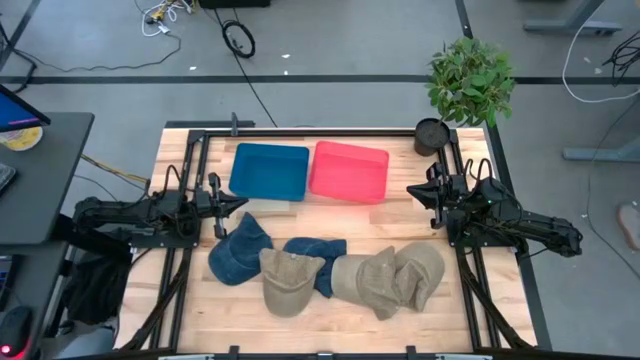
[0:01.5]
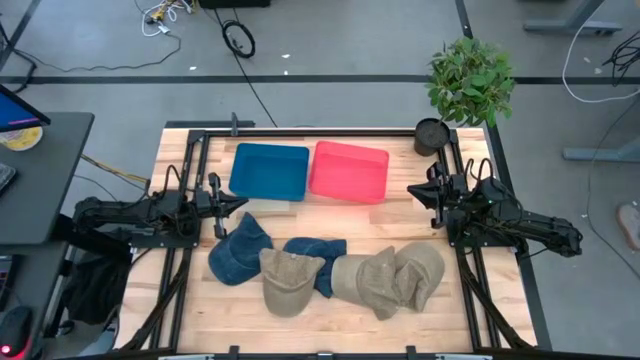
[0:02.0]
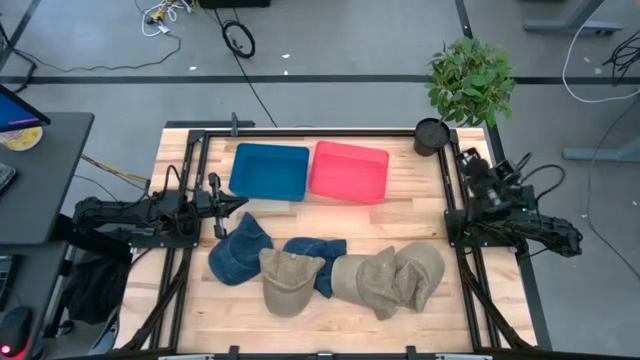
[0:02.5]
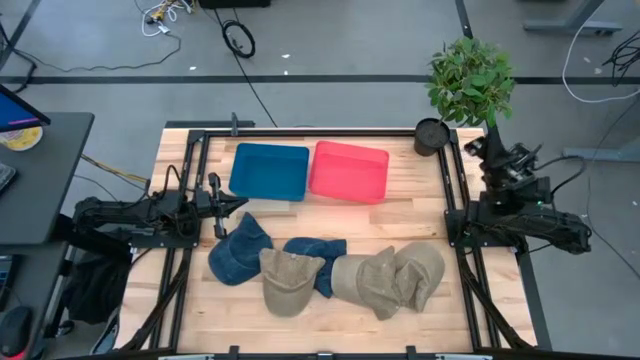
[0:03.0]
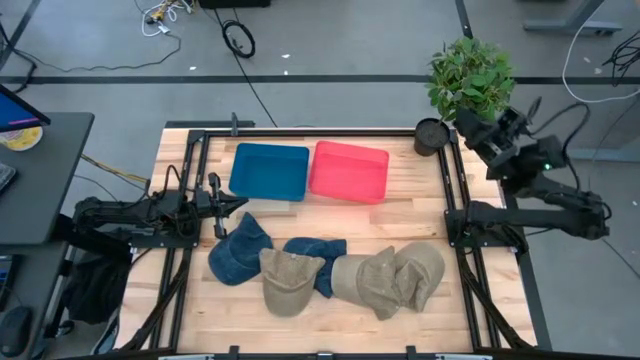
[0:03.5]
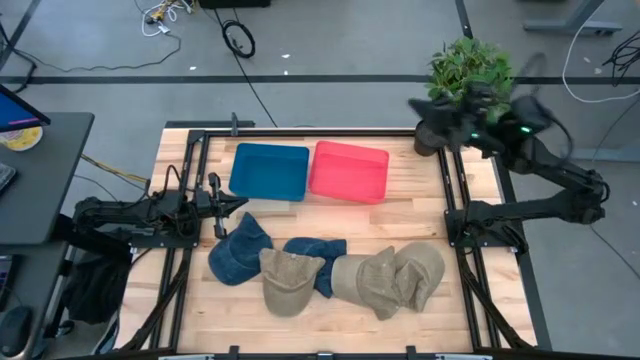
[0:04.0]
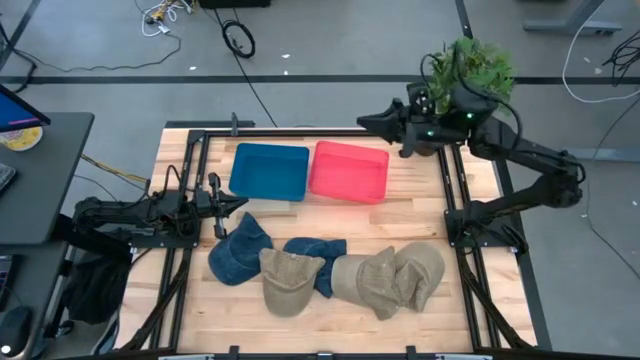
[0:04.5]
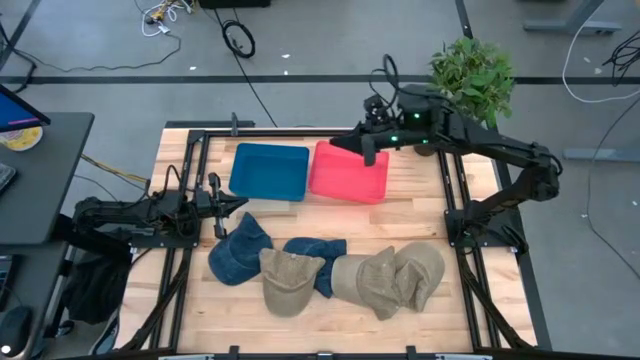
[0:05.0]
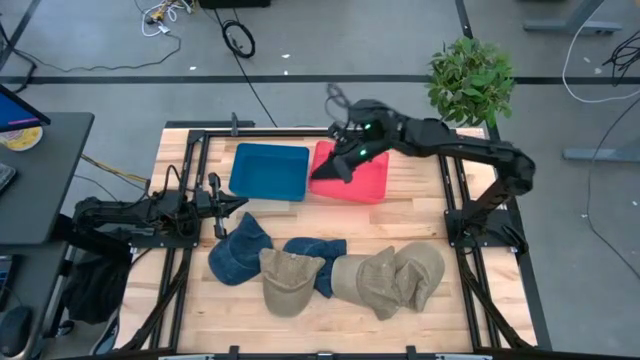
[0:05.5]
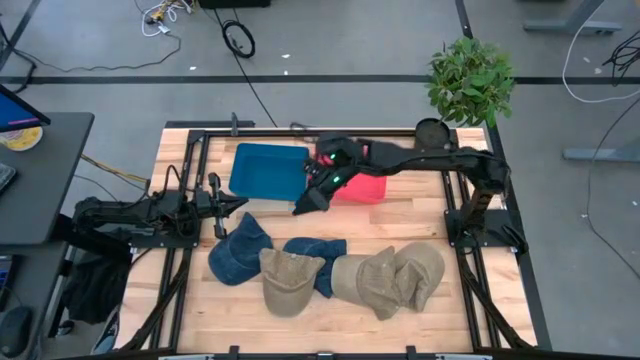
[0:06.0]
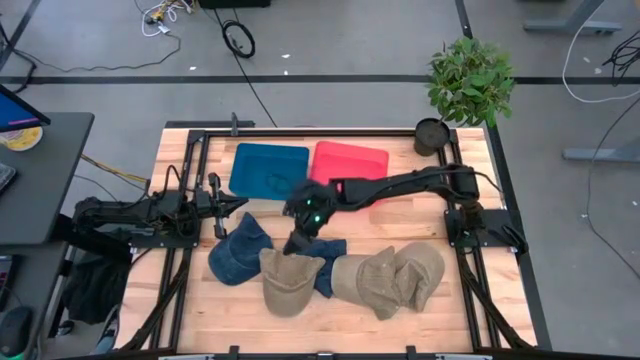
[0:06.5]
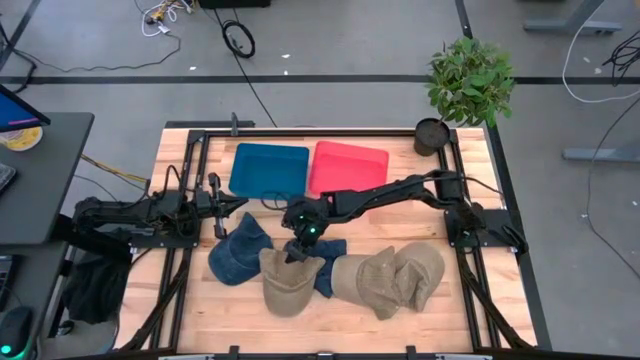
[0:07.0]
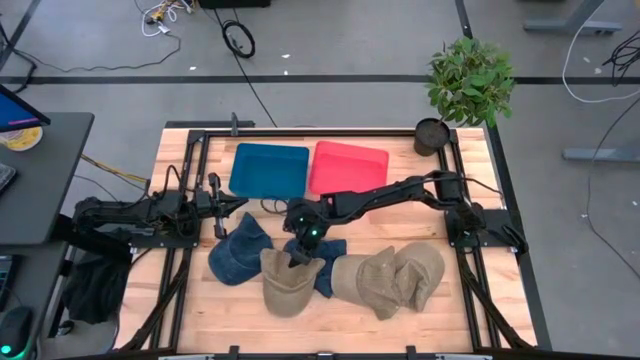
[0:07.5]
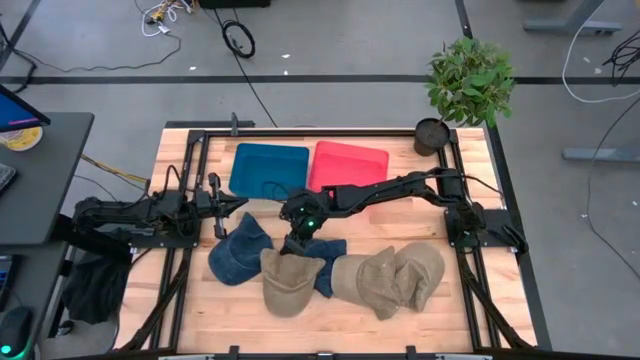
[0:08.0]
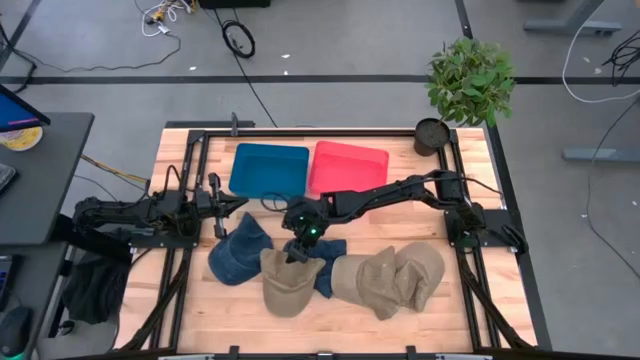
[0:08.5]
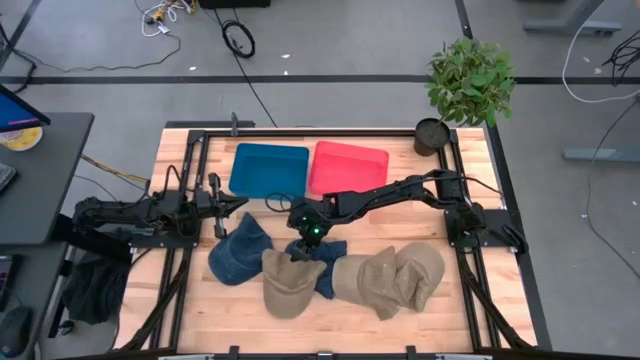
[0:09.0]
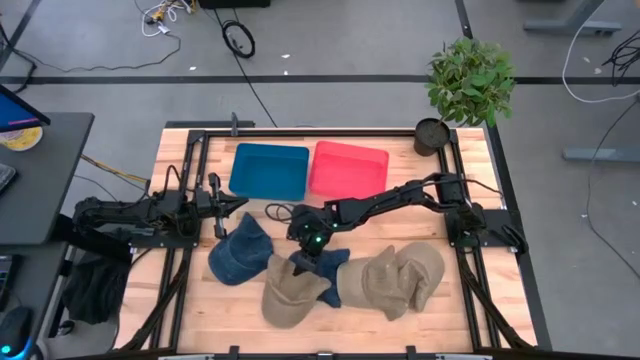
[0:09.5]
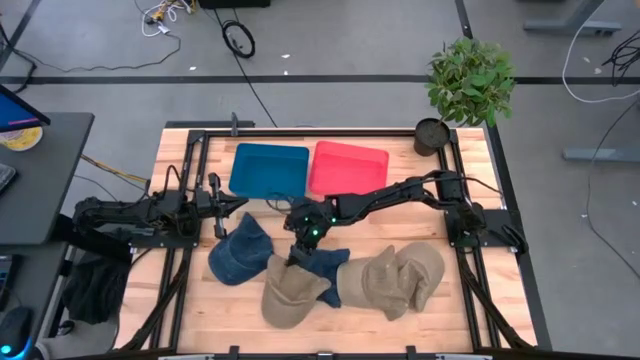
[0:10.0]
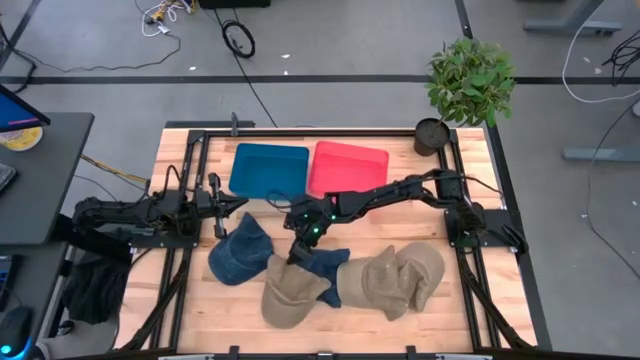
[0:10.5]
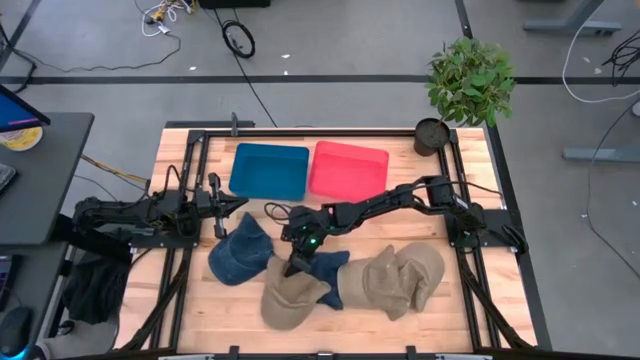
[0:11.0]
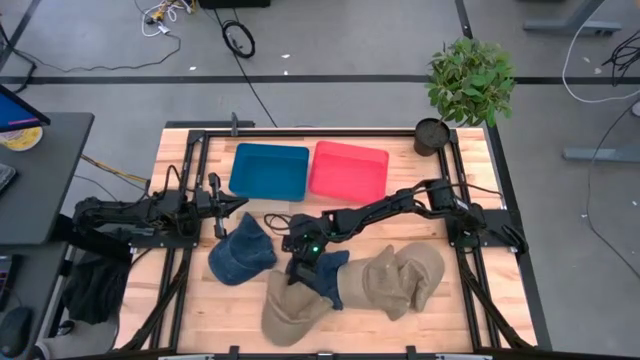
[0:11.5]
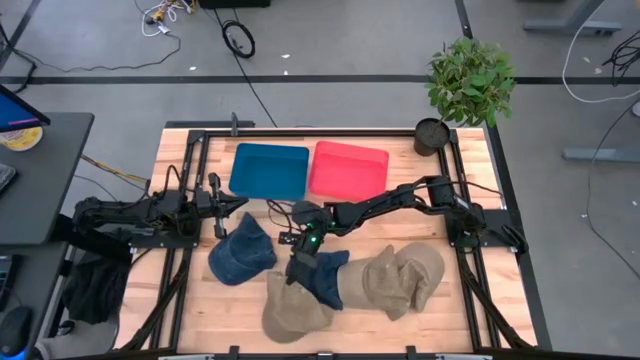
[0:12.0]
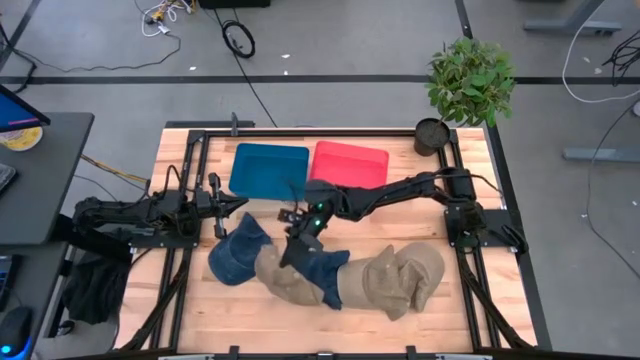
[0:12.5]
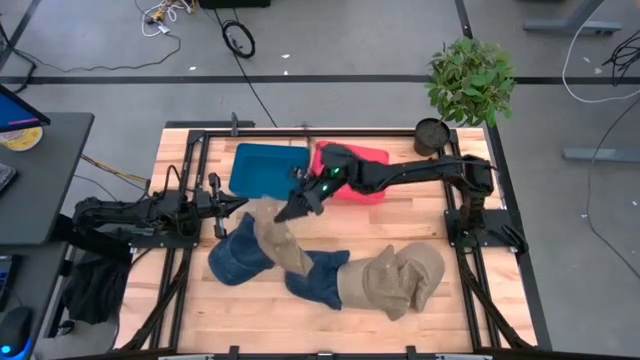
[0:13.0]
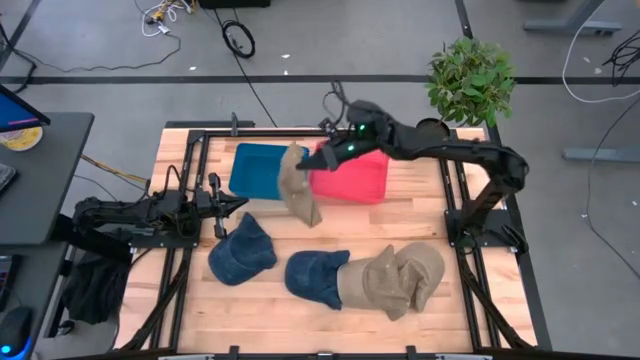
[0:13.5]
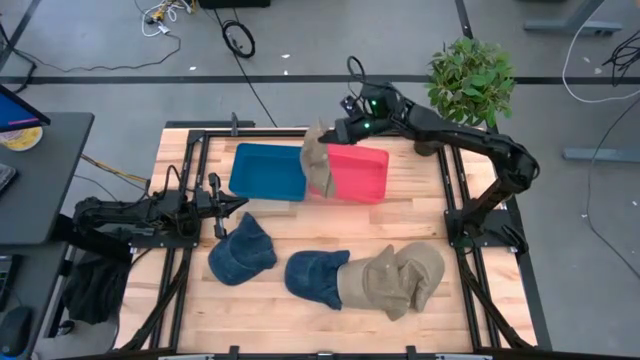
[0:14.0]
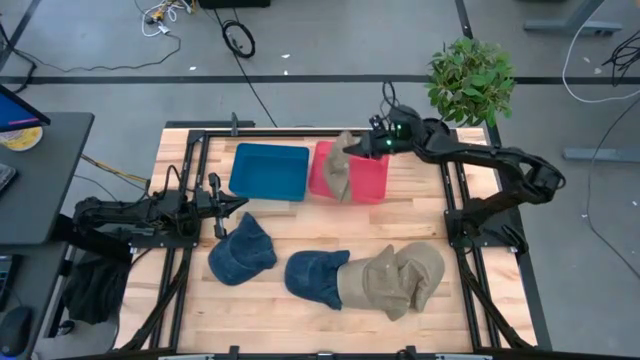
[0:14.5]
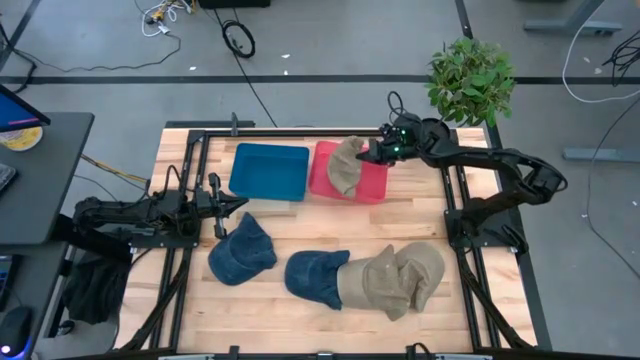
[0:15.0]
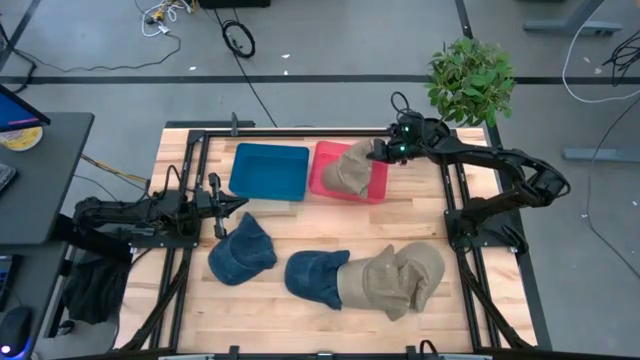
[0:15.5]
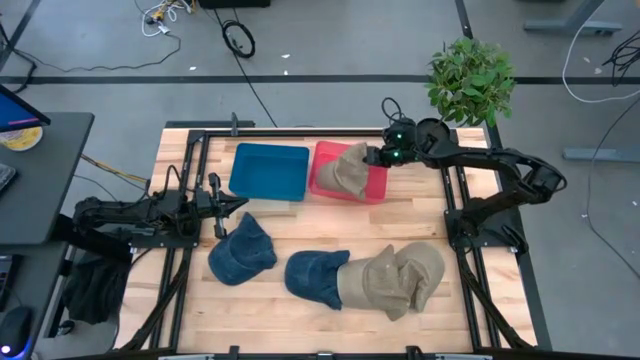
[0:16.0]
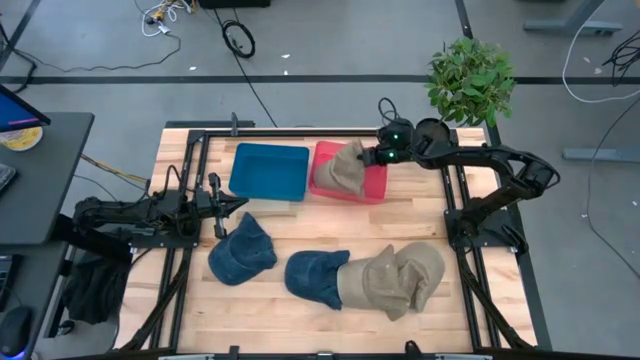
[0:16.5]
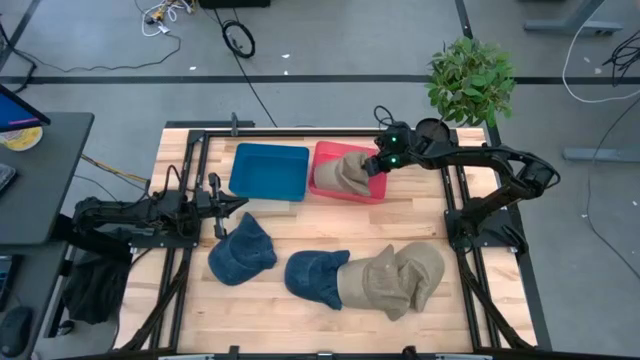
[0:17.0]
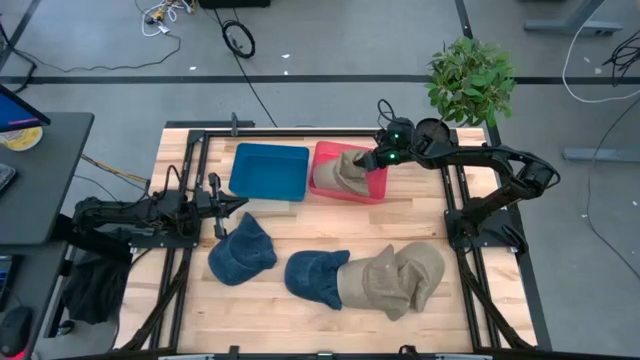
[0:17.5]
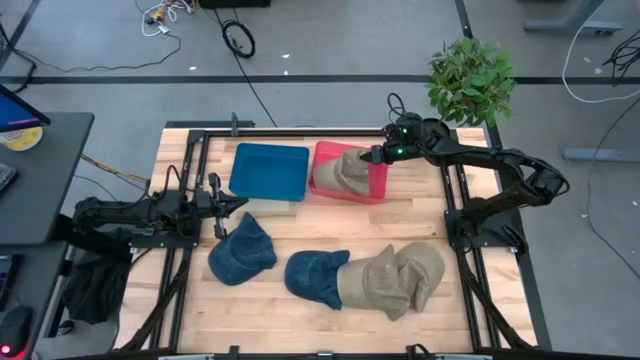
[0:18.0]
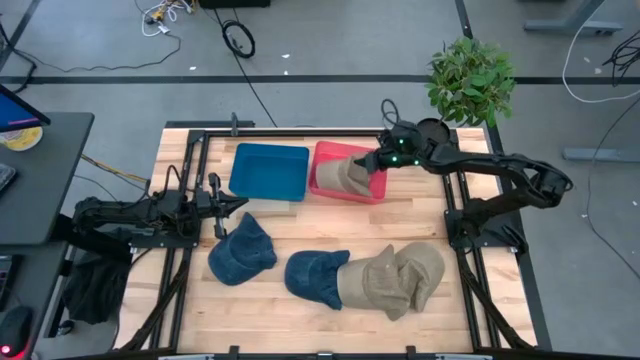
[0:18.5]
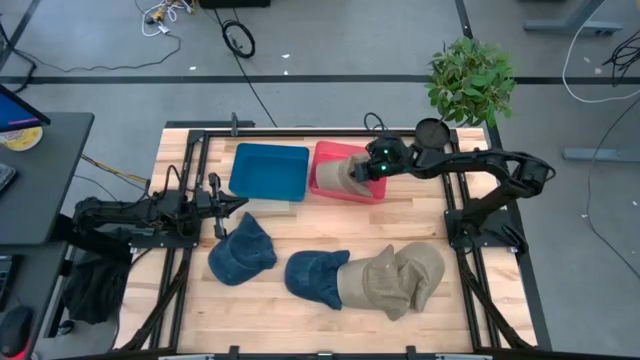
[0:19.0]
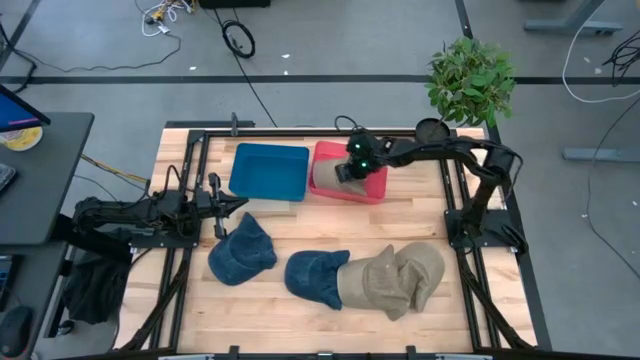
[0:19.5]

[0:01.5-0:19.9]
Task: Pick & Place hat
Put the left brown cap into the red bin
